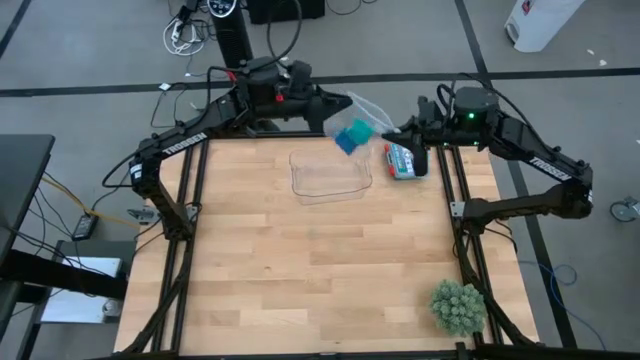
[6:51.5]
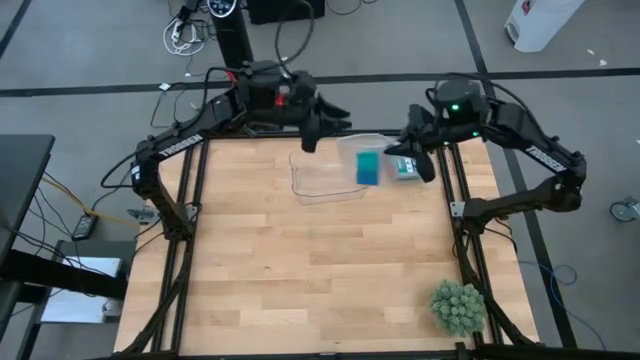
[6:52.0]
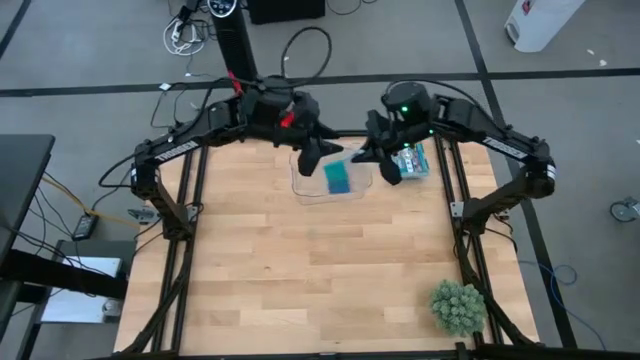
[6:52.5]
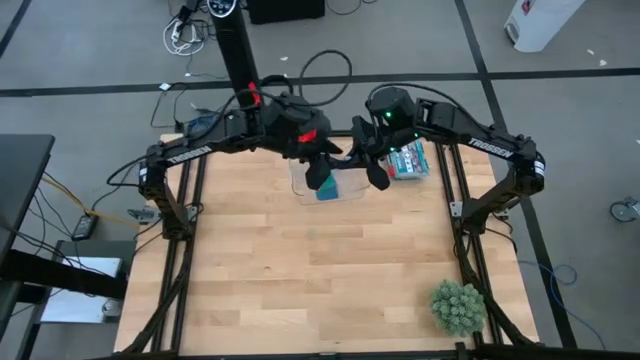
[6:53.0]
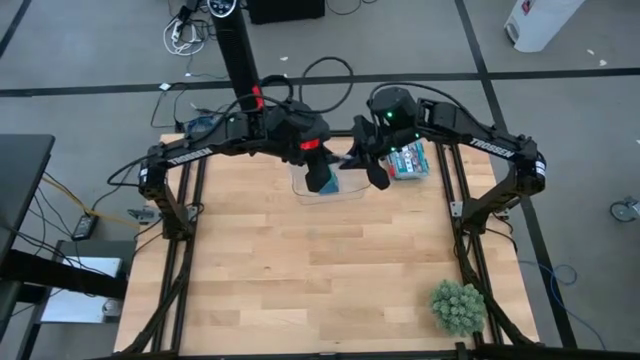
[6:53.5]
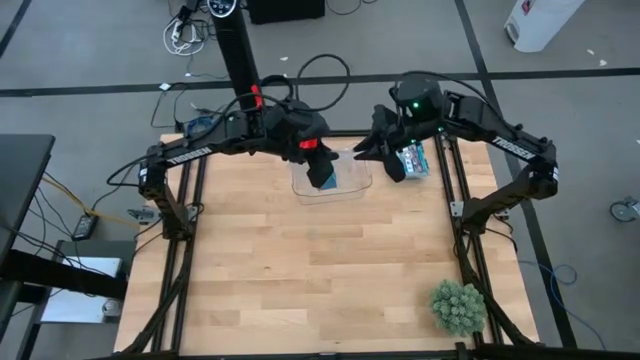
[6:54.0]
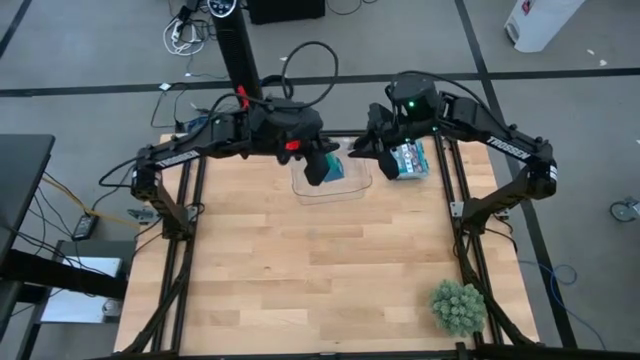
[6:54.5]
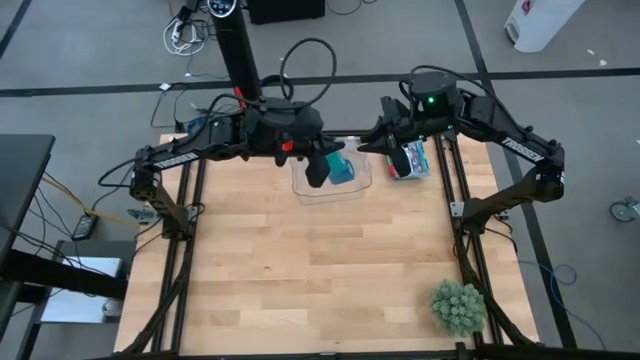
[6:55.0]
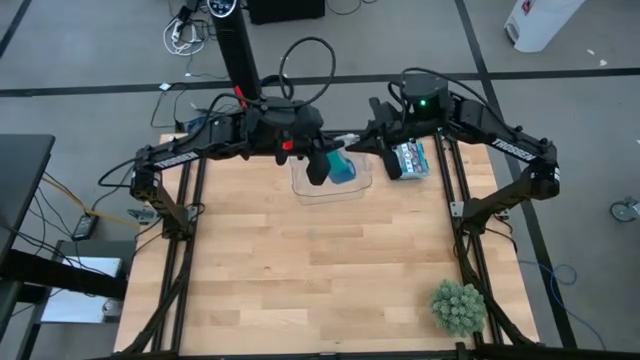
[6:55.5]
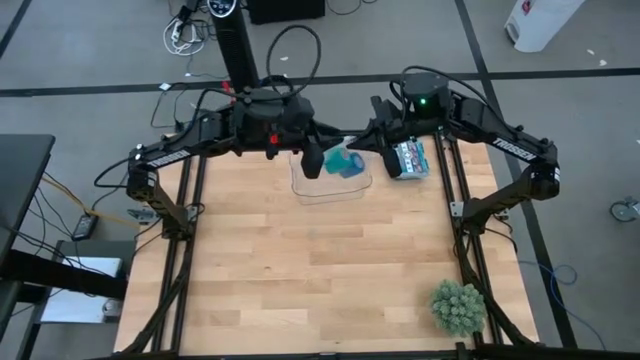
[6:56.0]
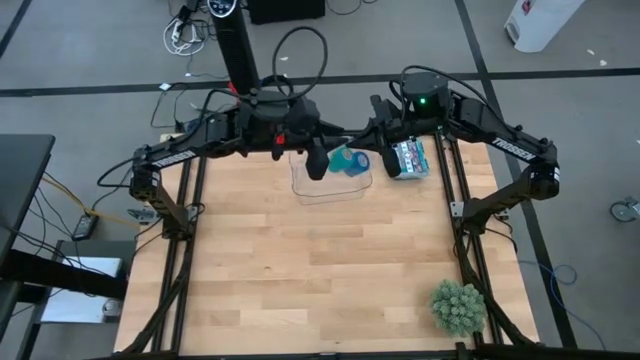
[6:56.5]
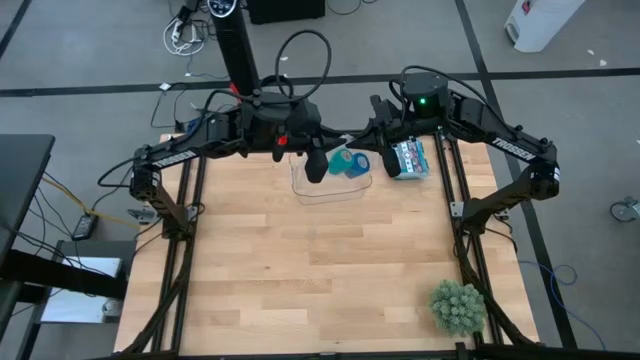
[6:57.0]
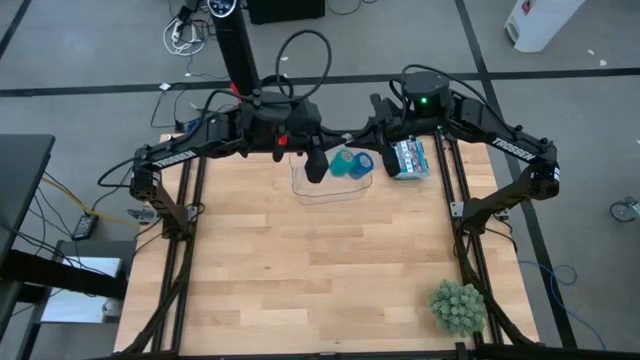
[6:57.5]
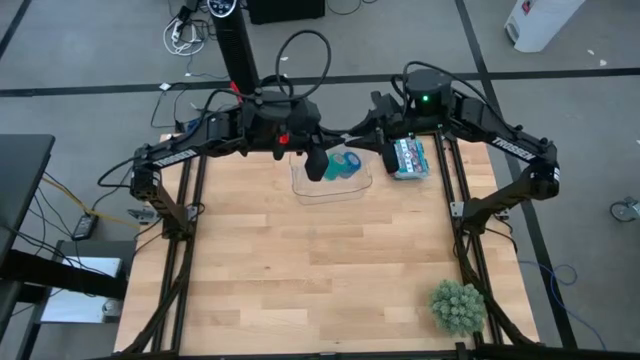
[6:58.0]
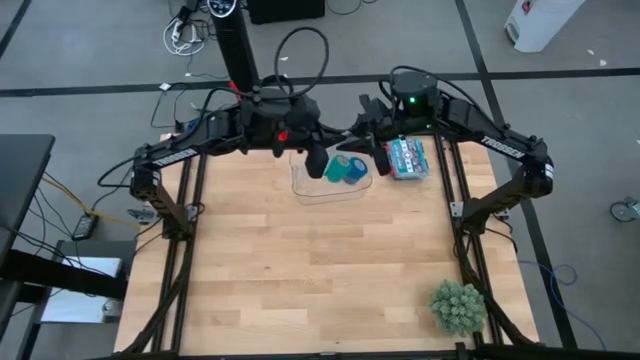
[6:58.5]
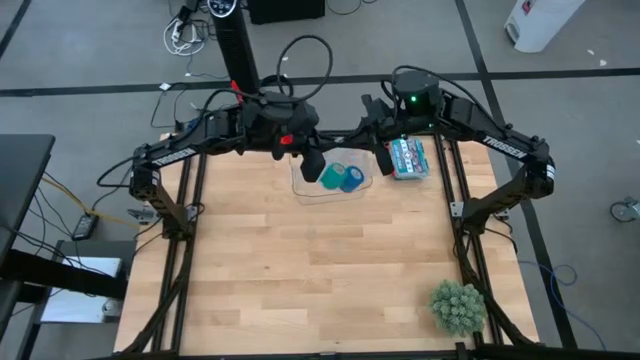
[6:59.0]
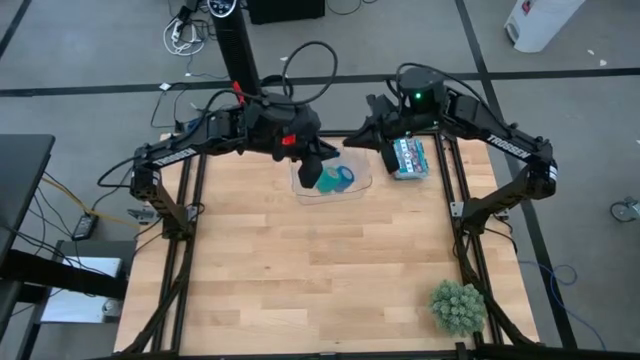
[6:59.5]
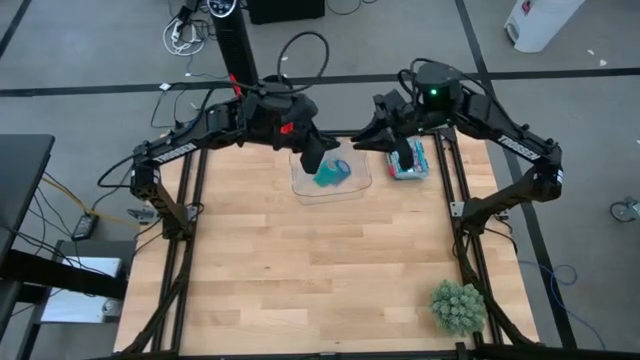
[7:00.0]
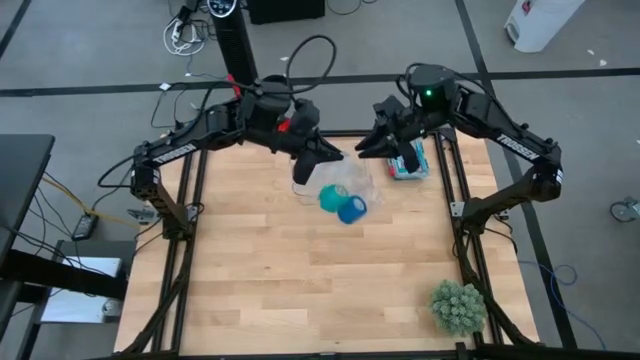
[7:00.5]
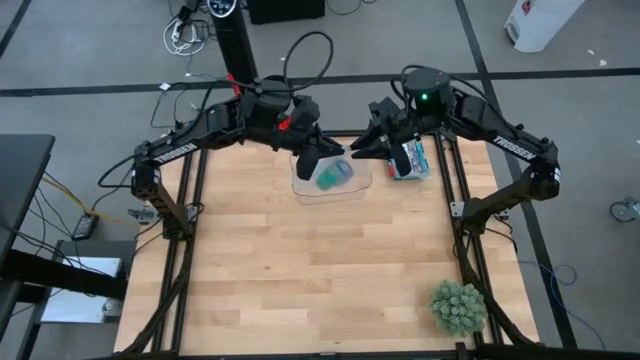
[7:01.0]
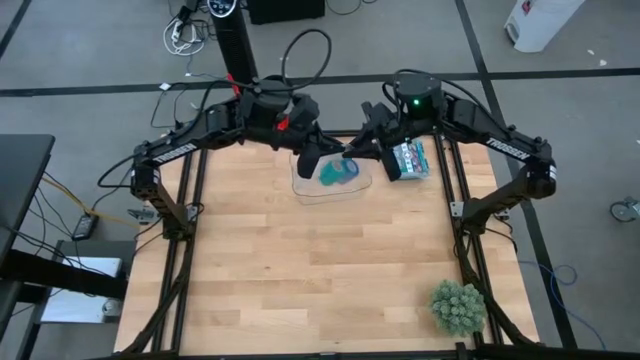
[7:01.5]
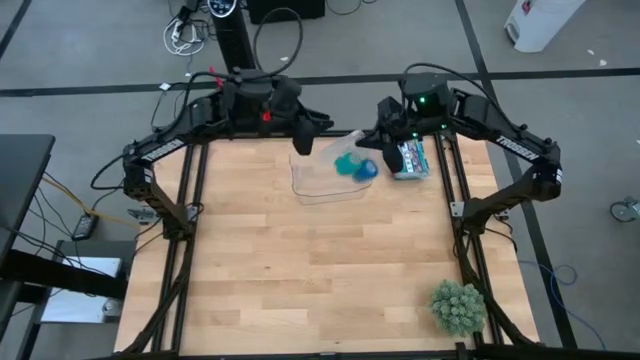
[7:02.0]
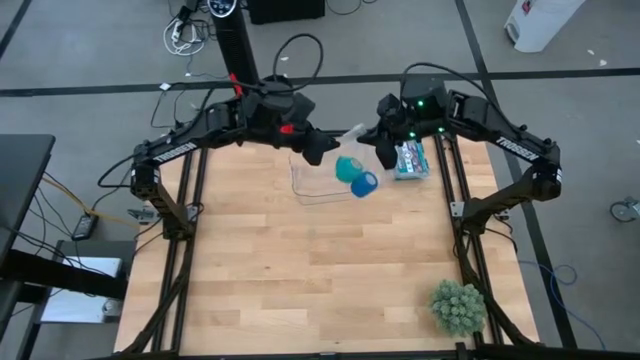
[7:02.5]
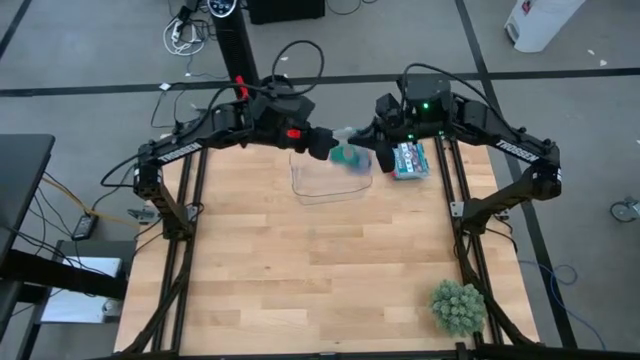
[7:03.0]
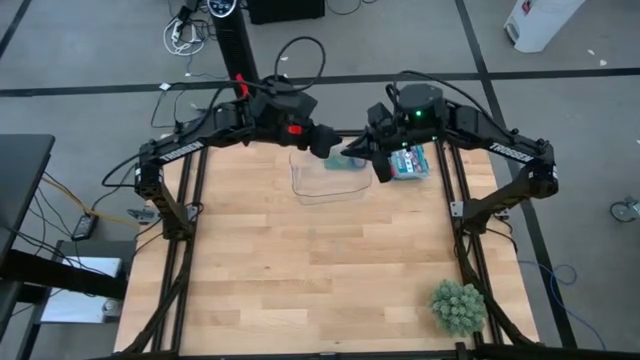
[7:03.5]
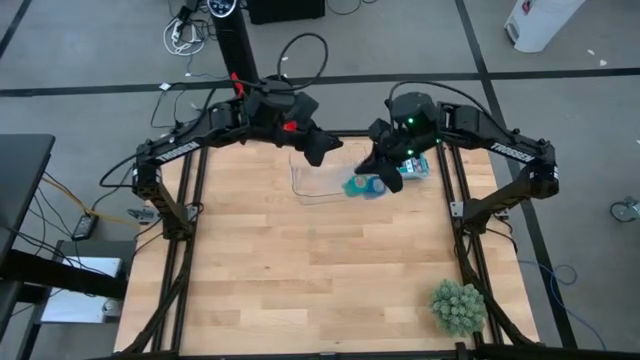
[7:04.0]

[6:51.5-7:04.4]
Task: Roll bandage
Close the transparent zip bag

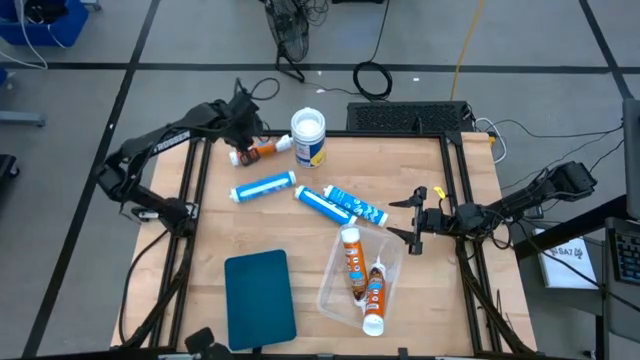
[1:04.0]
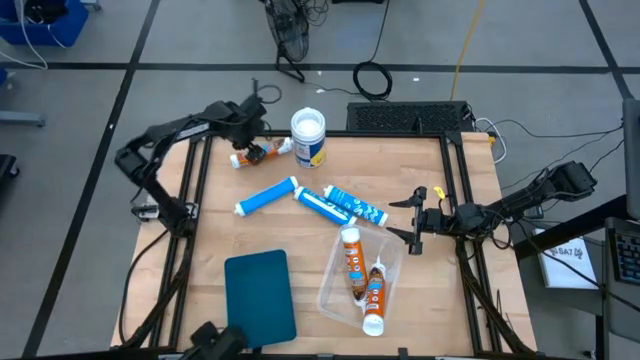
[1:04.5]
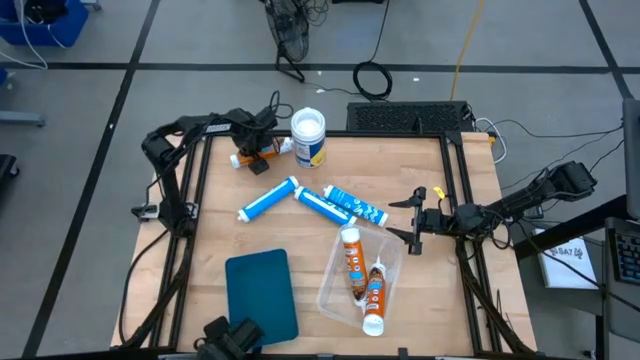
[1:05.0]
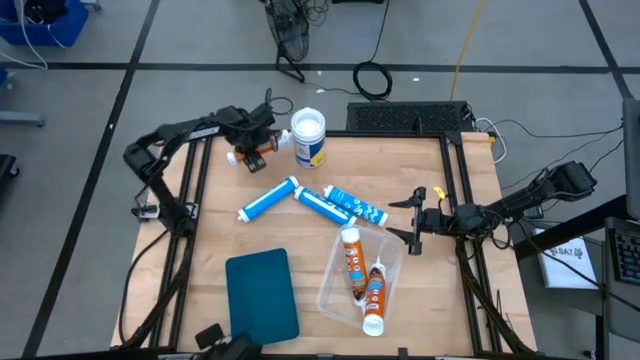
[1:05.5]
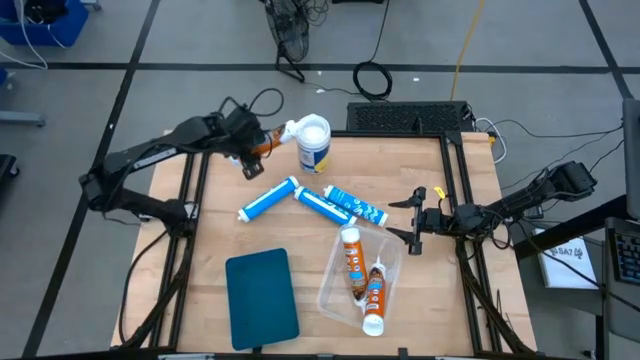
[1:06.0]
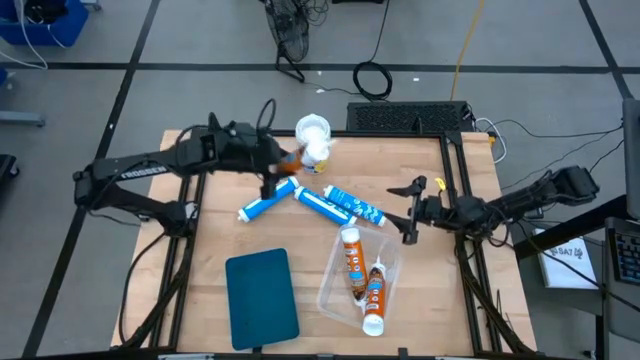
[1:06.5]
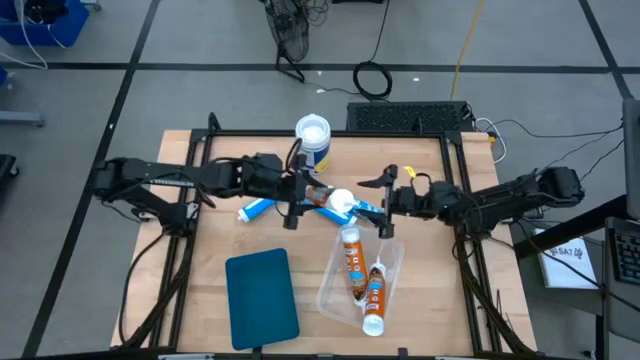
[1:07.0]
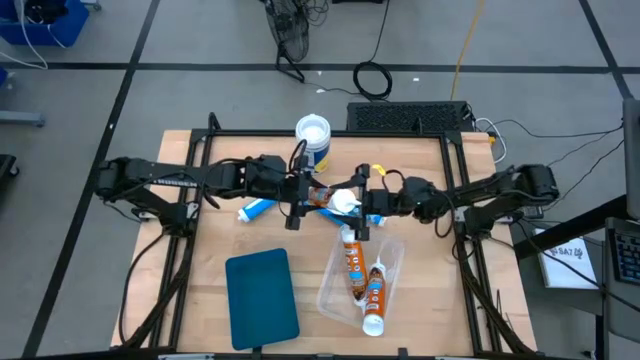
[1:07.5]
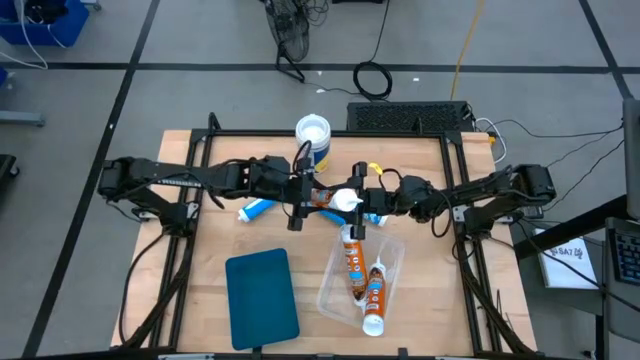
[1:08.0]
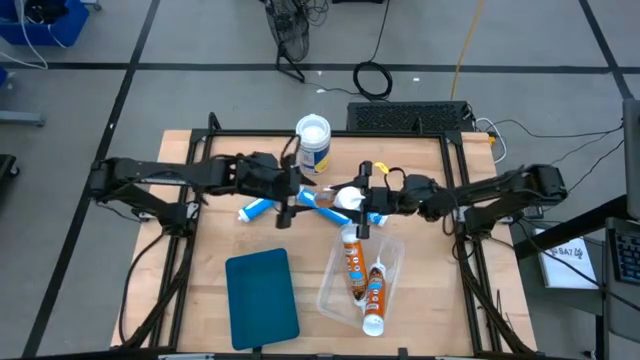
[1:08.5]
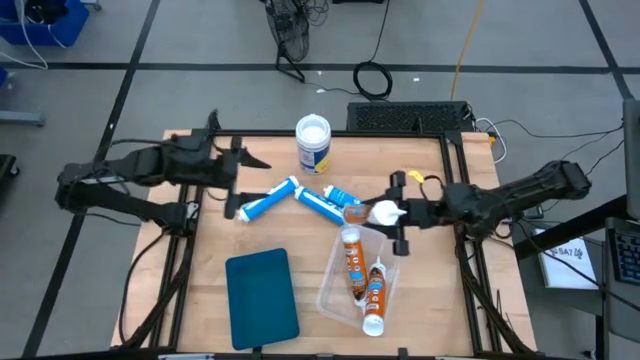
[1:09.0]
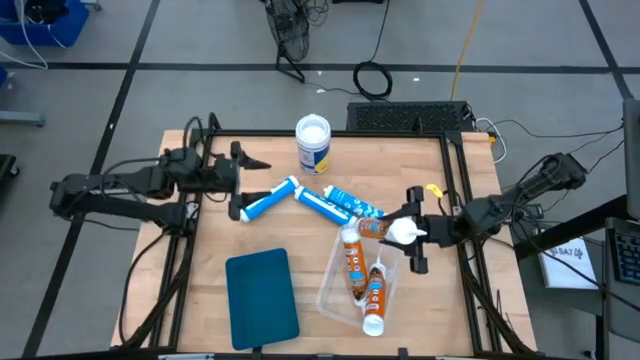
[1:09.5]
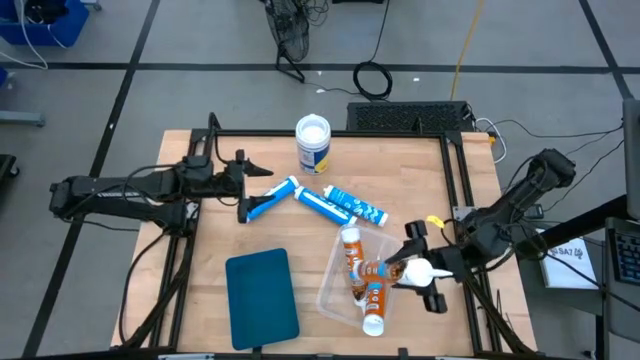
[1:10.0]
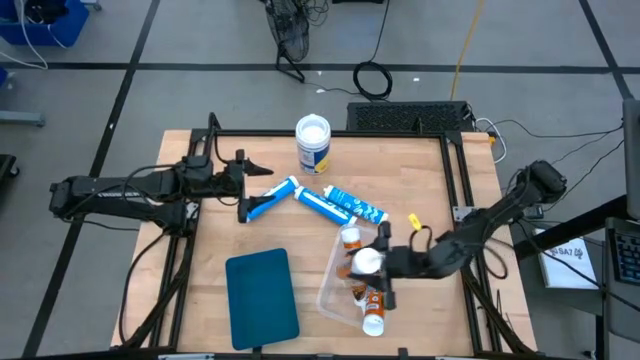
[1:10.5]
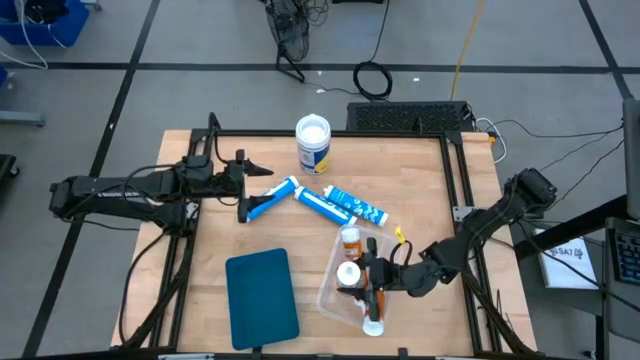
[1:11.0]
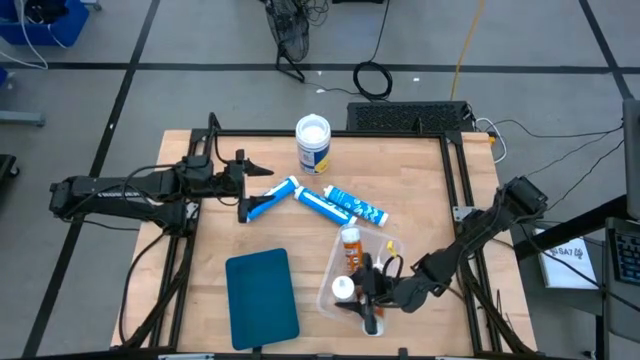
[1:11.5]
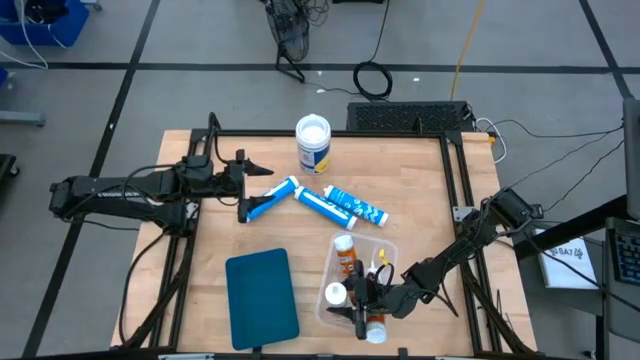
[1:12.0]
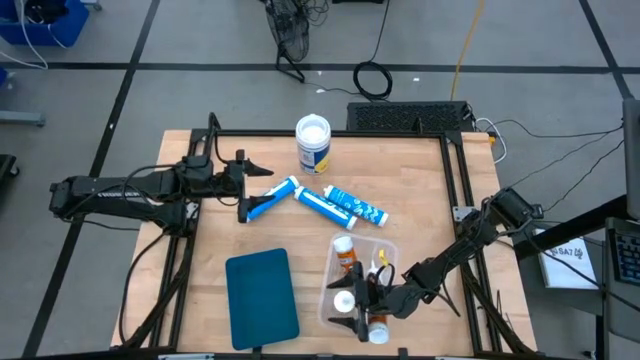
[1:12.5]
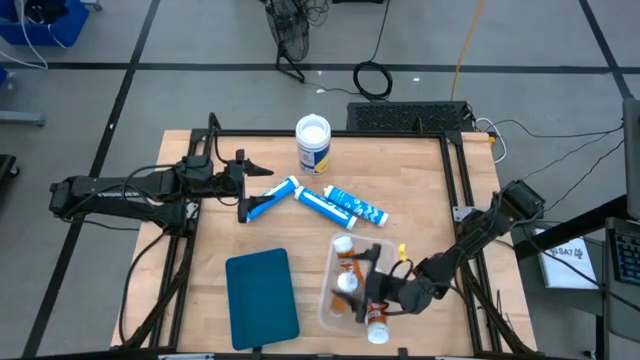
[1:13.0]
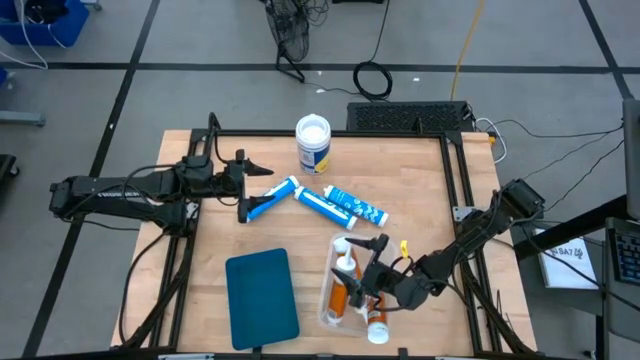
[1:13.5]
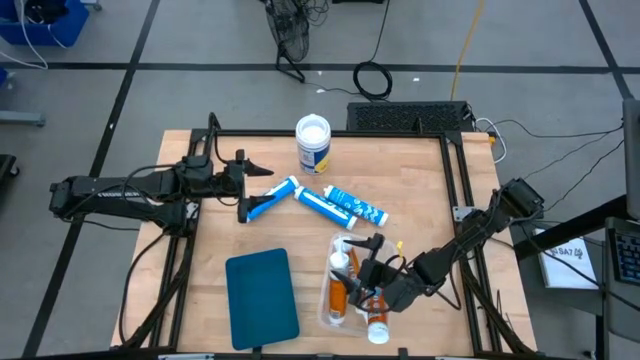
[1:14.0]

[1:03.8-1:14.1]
Task: Pick & place silicon tubes, Sealant and Lysol wipes
Put the orange sealant into the white bin
